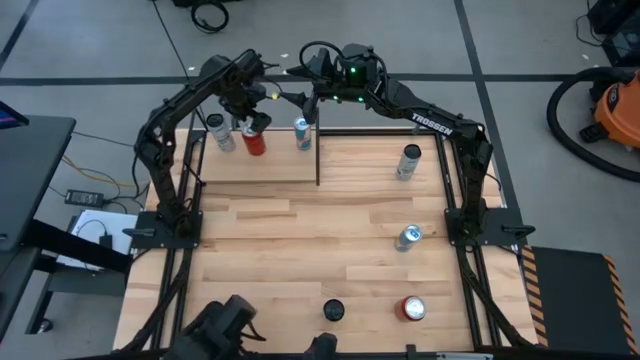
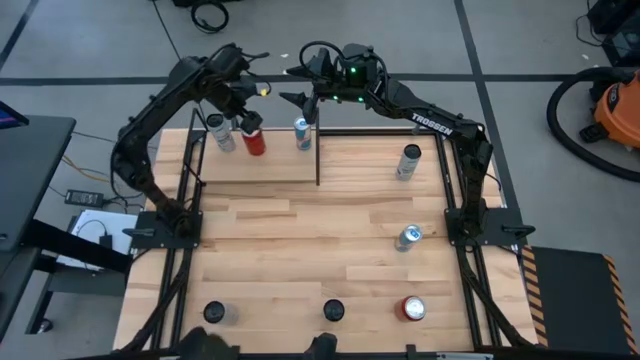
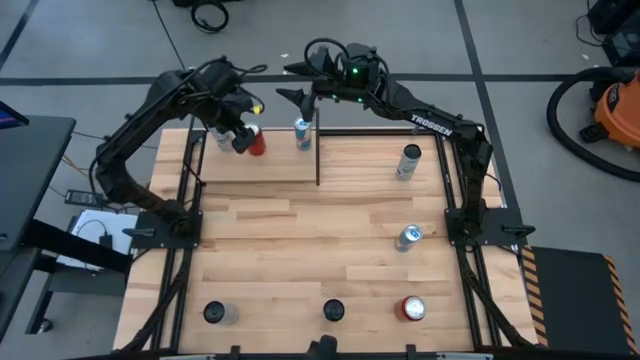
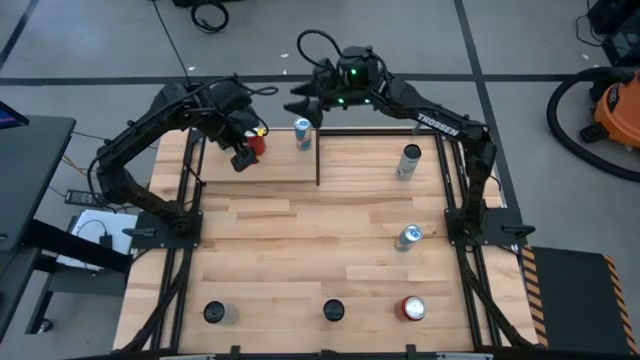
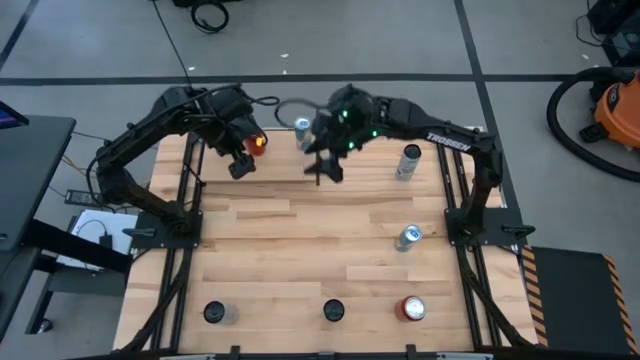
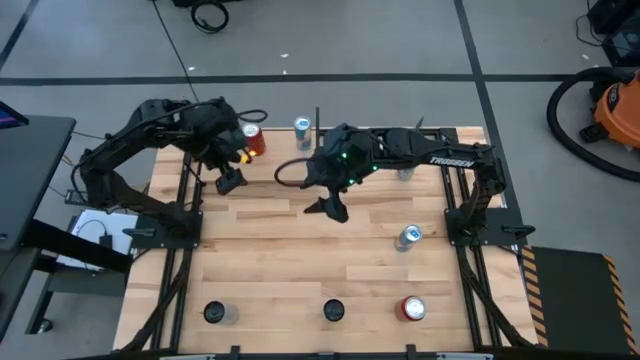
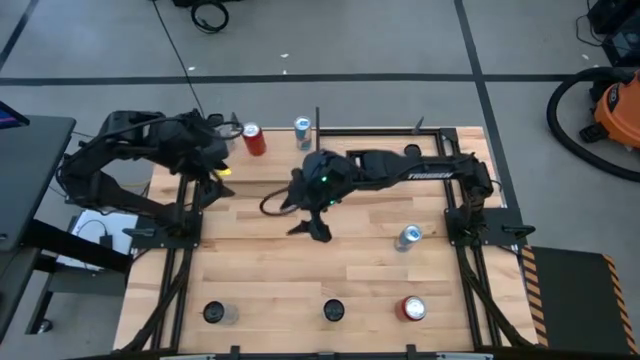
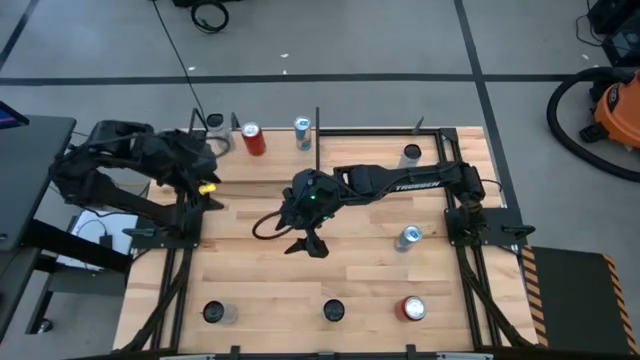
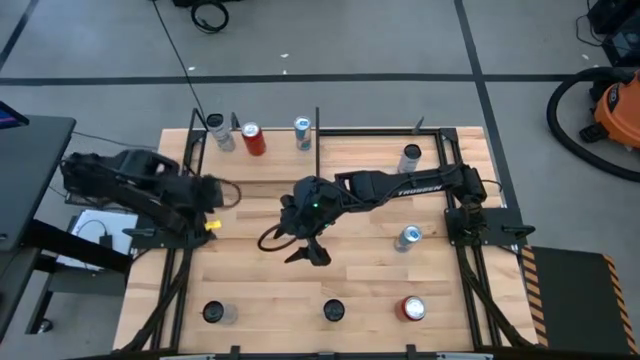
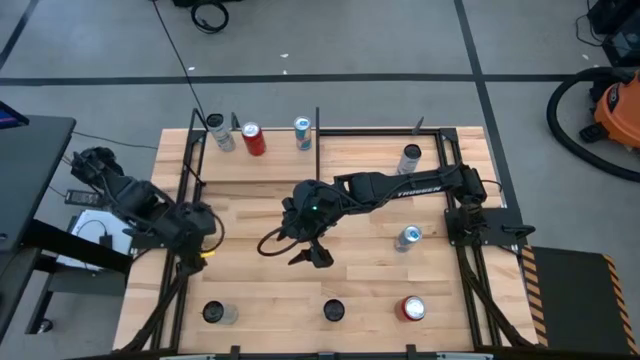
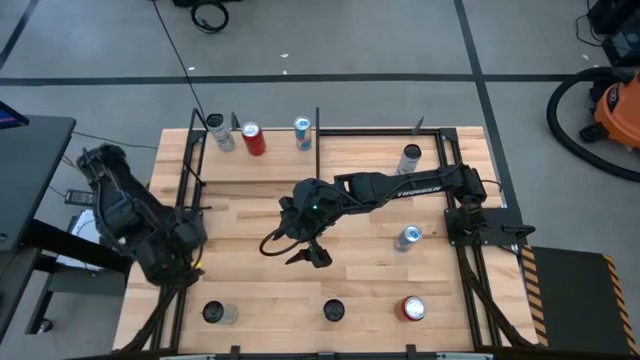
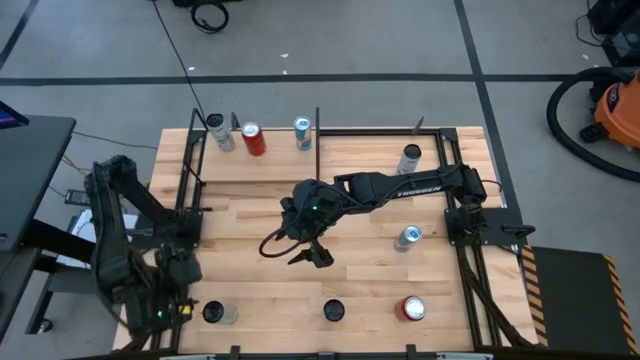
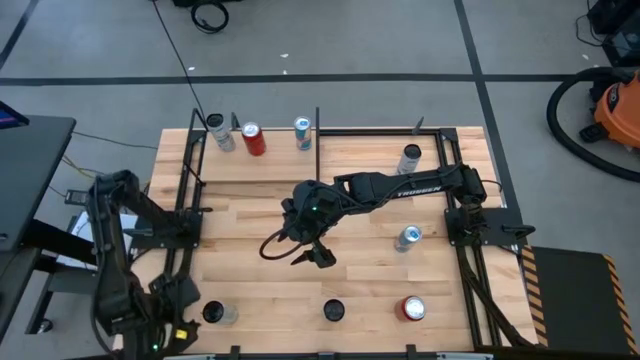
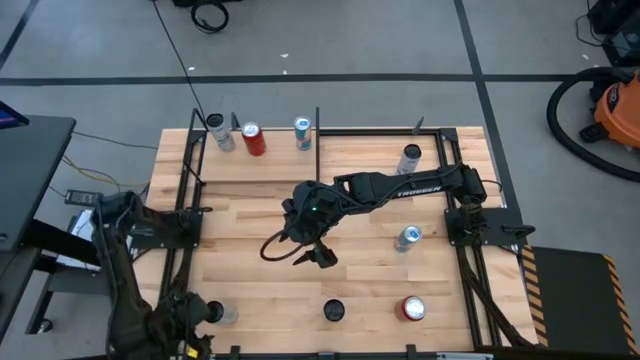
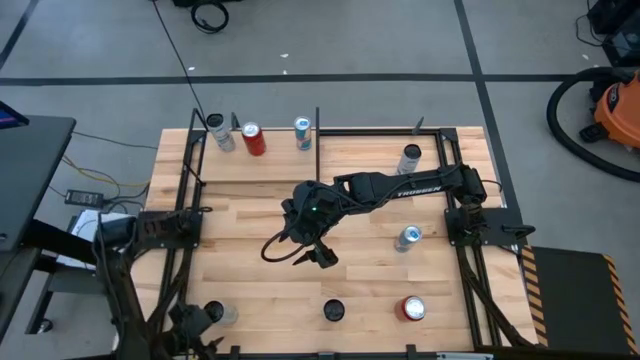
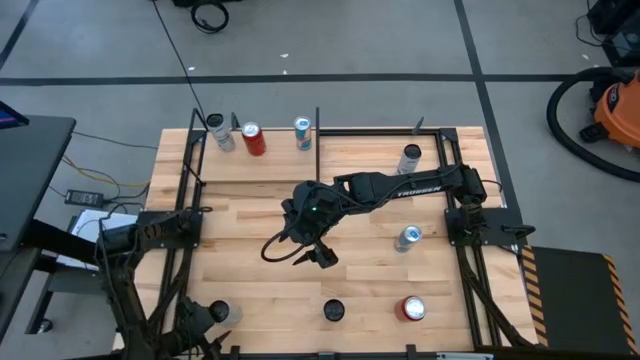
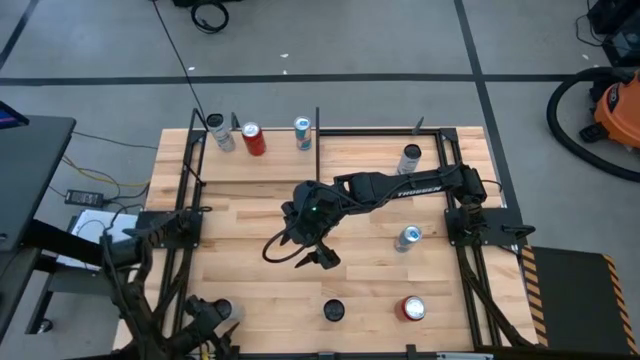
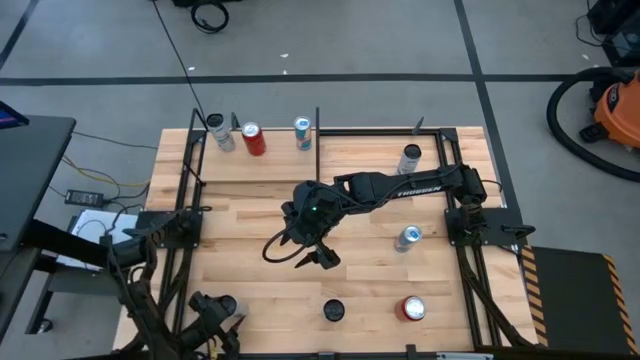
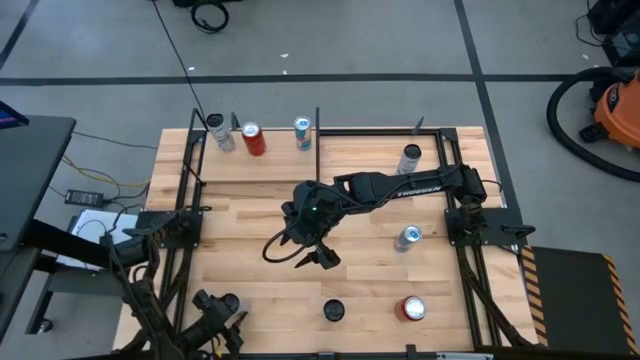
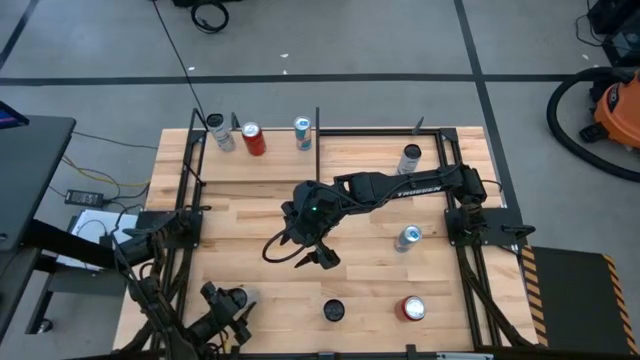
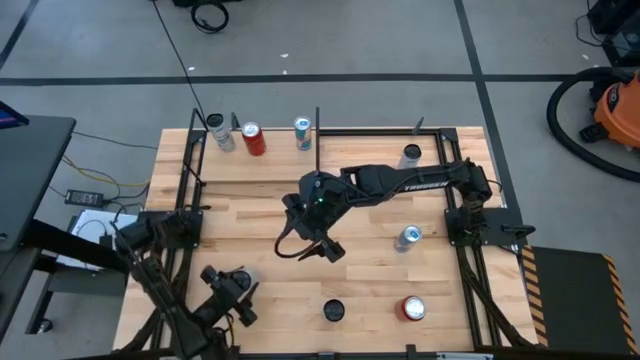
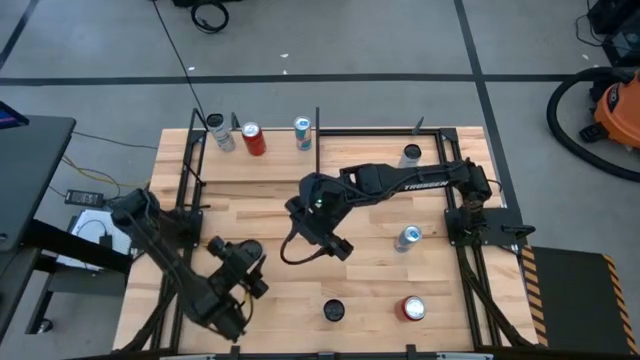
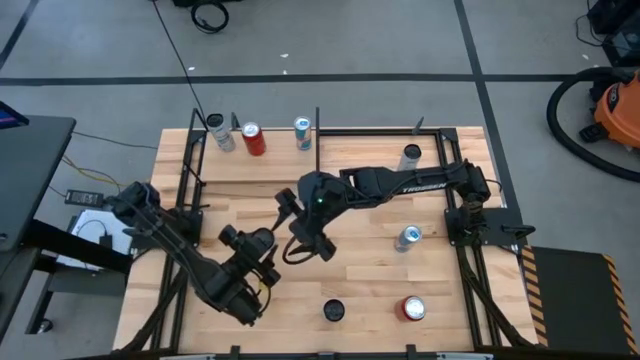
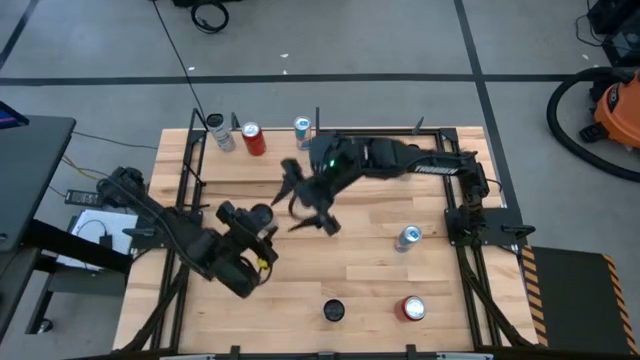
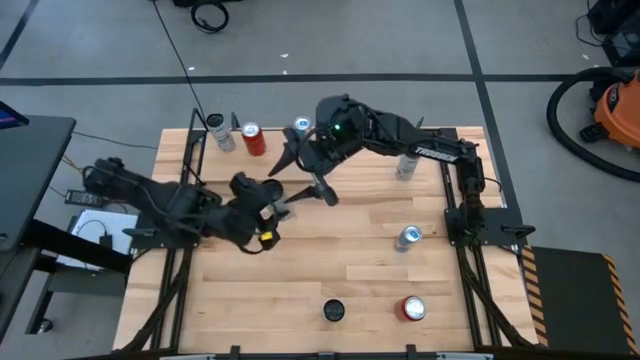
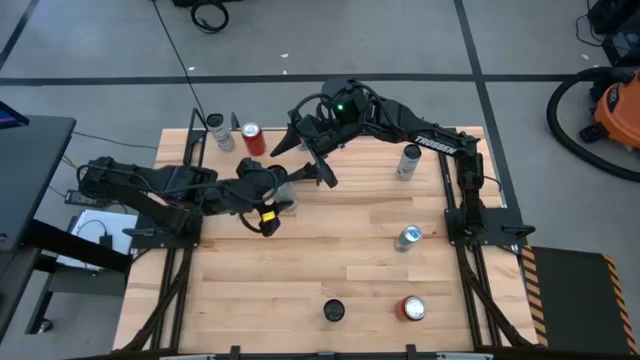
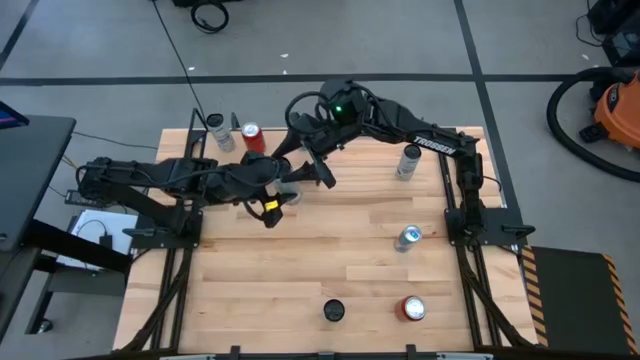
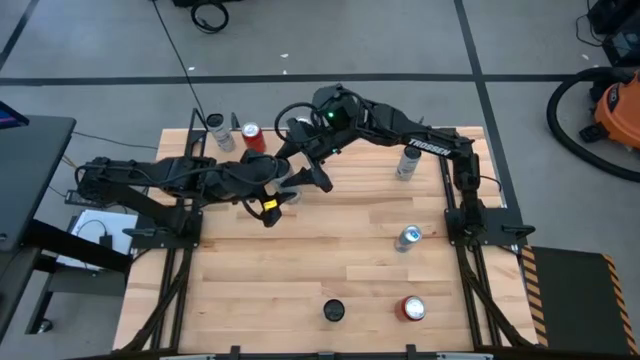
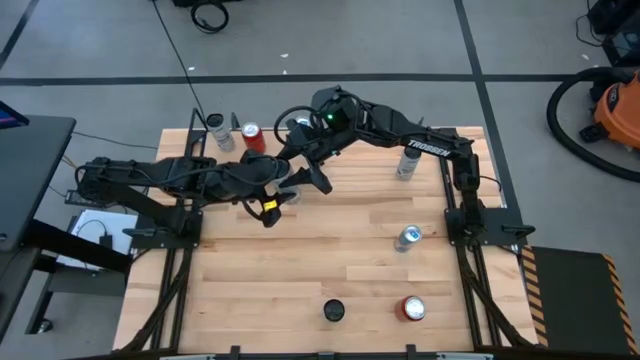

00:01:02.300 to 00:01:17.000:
Task: Place canned beverage on shelf
Put the white-yellow soda can on the shelf
